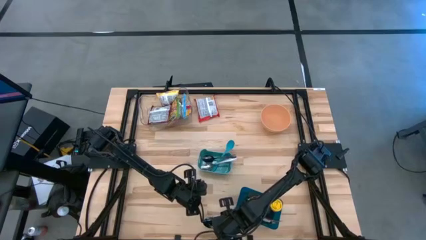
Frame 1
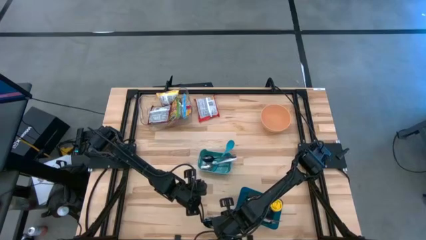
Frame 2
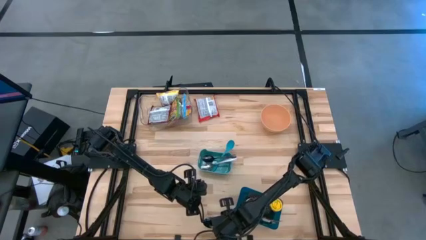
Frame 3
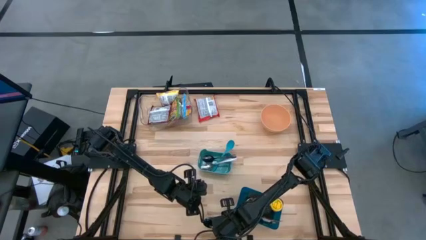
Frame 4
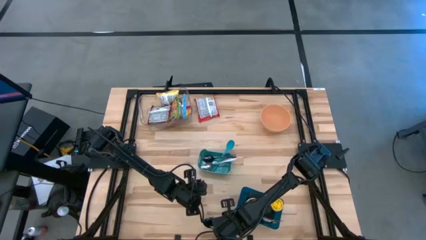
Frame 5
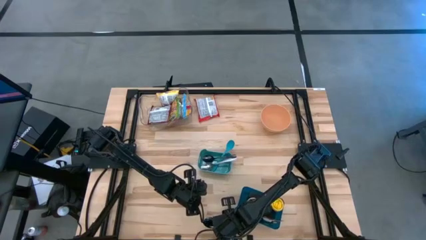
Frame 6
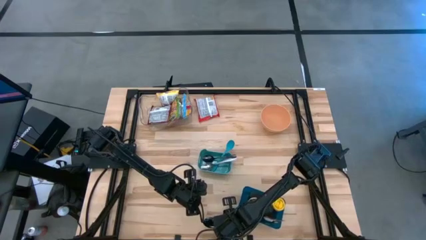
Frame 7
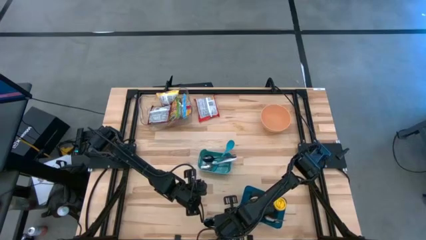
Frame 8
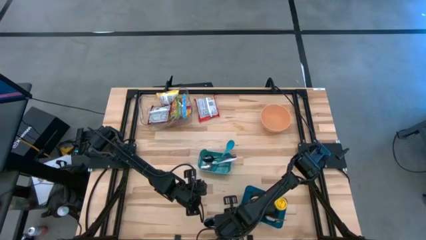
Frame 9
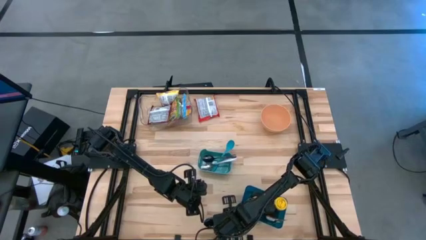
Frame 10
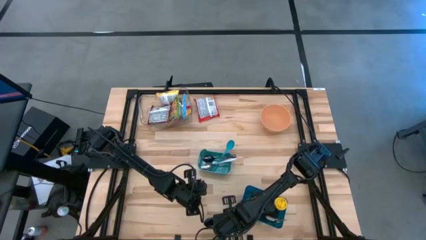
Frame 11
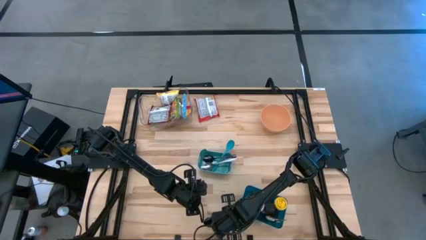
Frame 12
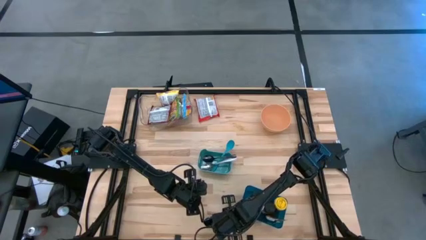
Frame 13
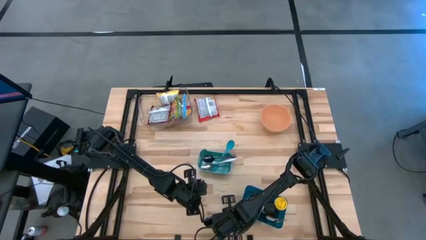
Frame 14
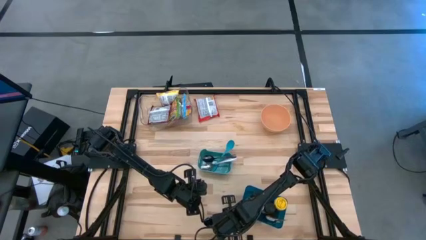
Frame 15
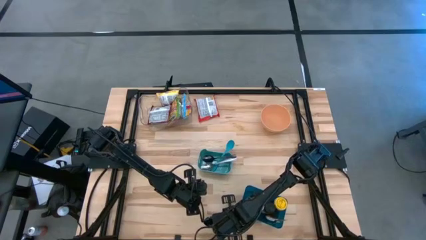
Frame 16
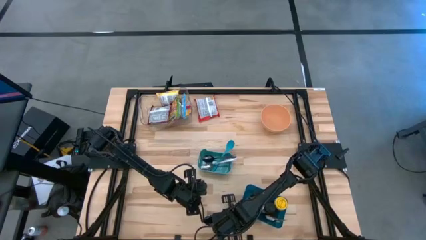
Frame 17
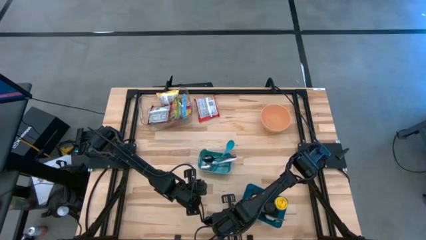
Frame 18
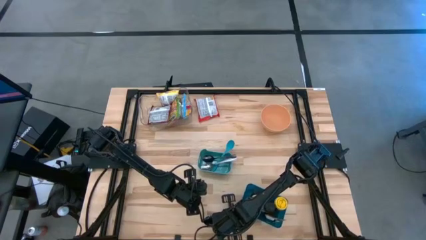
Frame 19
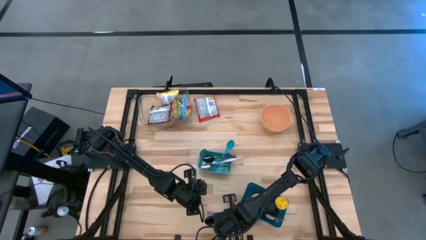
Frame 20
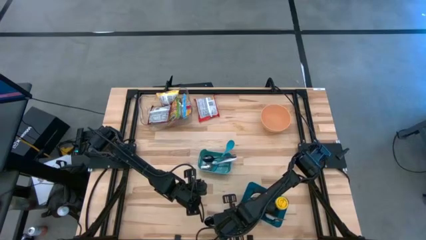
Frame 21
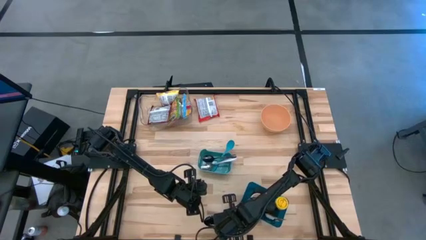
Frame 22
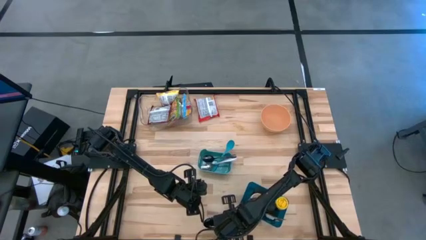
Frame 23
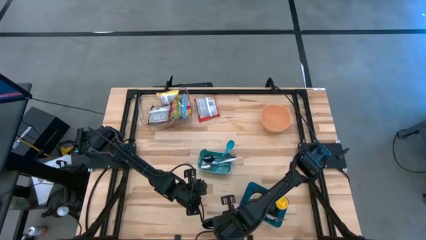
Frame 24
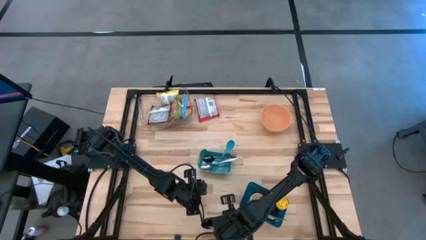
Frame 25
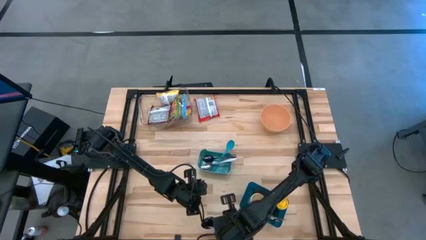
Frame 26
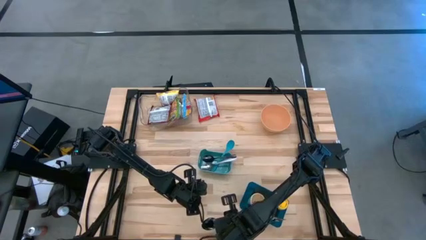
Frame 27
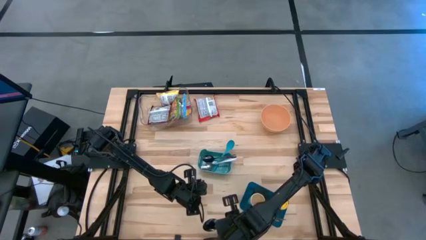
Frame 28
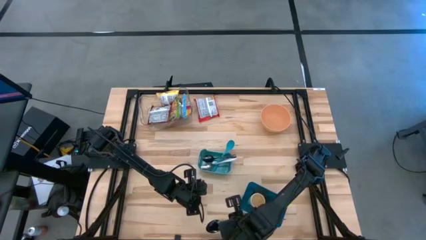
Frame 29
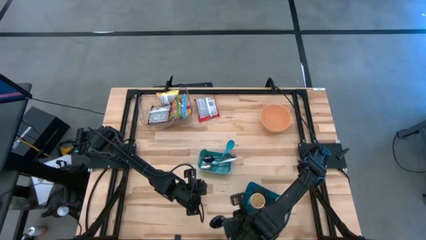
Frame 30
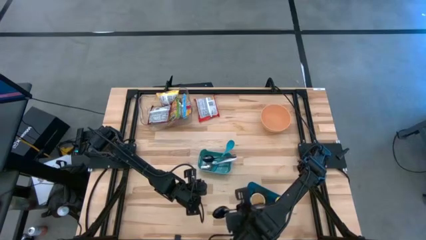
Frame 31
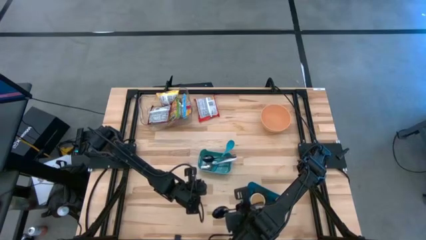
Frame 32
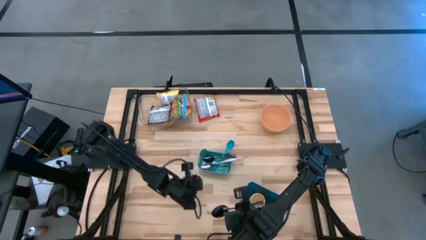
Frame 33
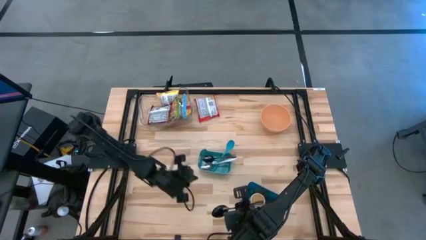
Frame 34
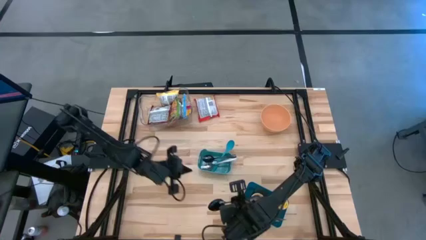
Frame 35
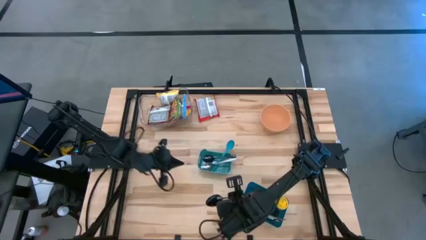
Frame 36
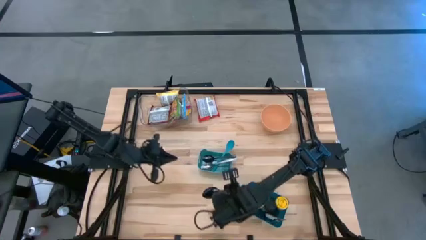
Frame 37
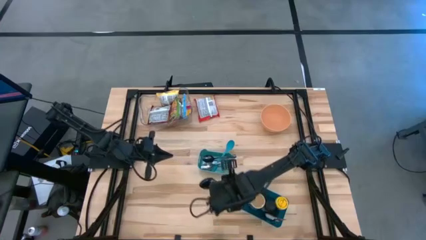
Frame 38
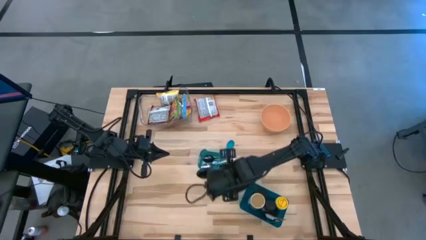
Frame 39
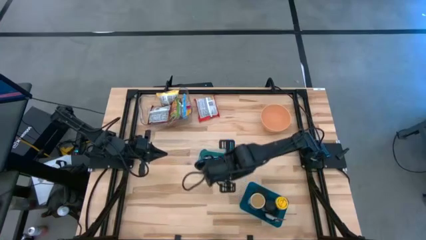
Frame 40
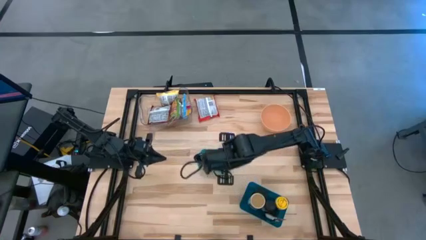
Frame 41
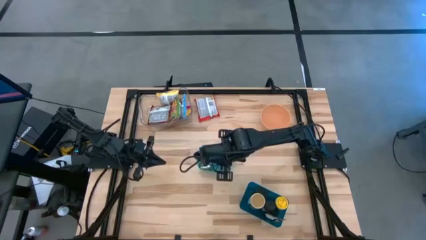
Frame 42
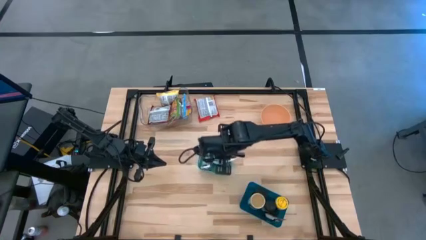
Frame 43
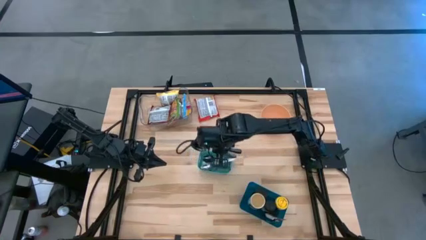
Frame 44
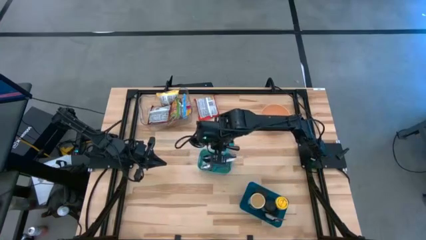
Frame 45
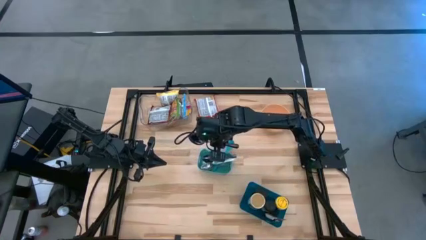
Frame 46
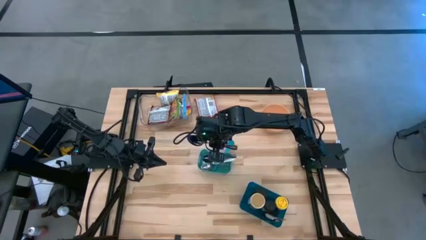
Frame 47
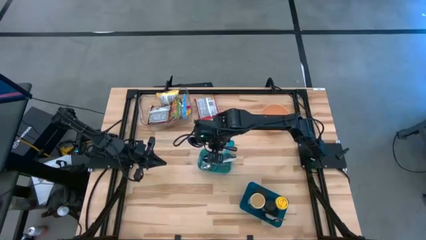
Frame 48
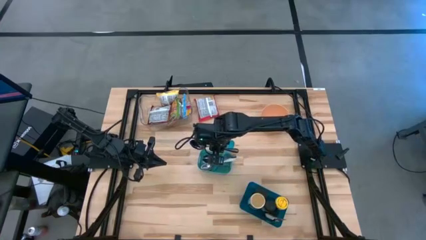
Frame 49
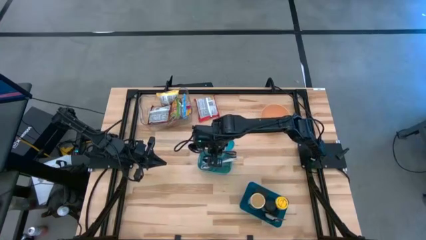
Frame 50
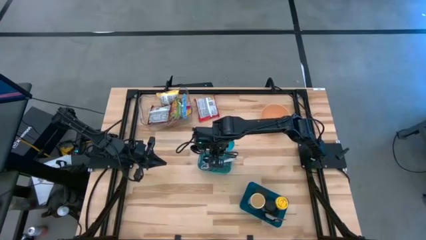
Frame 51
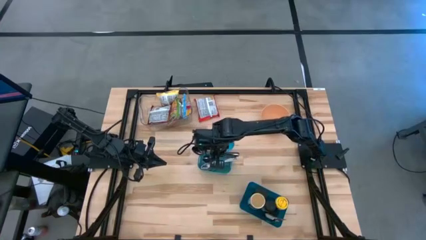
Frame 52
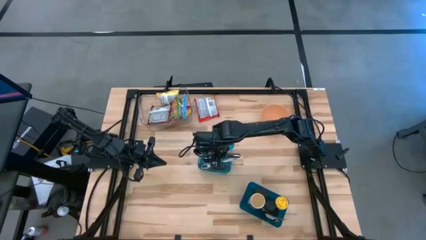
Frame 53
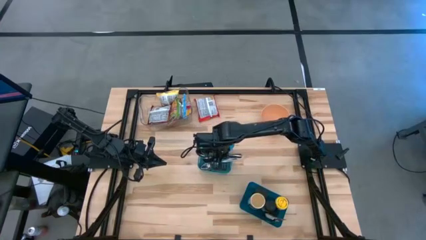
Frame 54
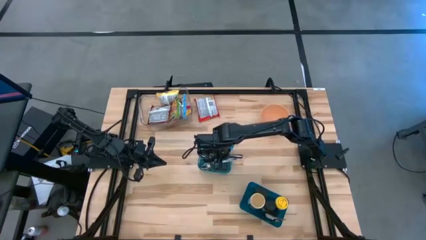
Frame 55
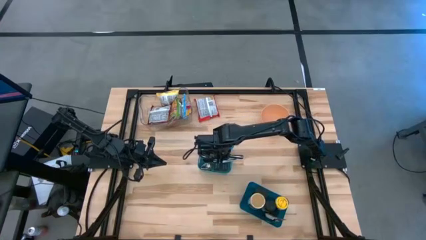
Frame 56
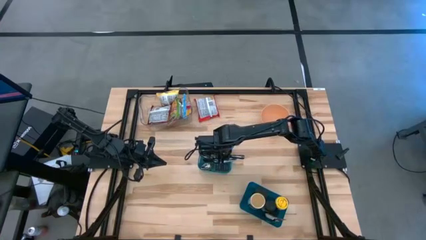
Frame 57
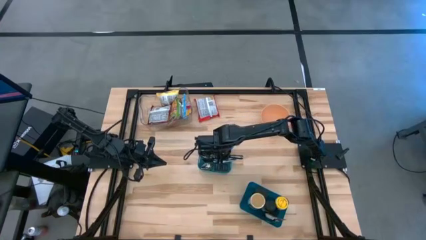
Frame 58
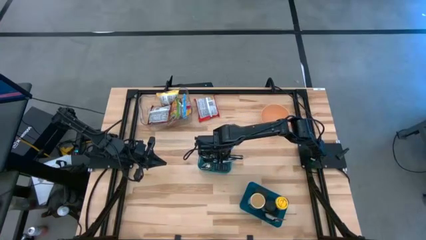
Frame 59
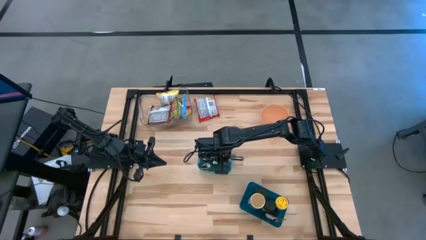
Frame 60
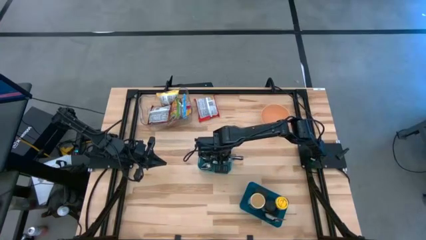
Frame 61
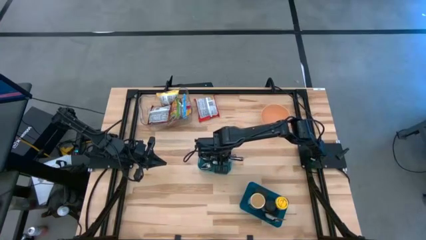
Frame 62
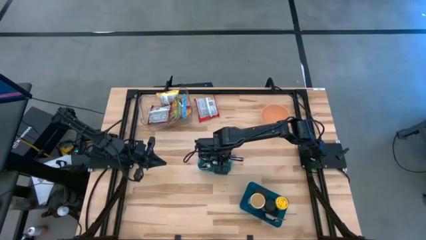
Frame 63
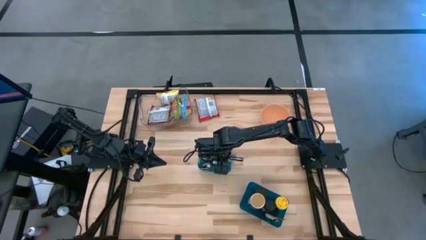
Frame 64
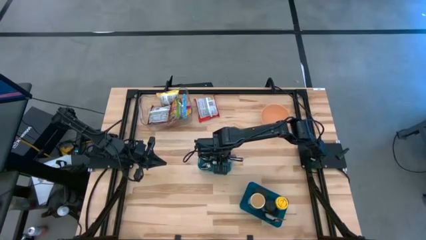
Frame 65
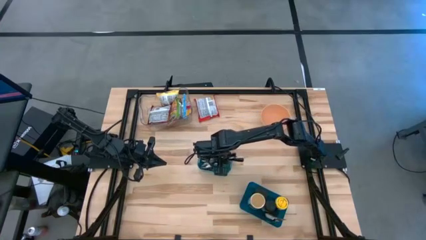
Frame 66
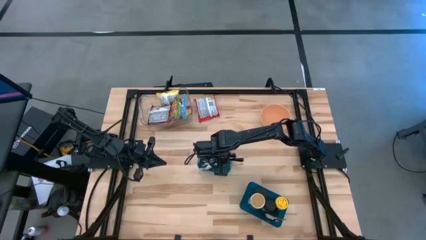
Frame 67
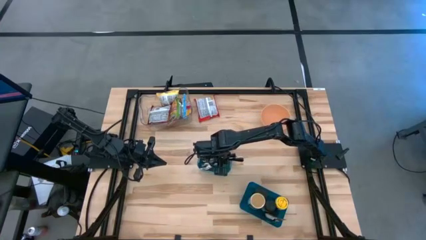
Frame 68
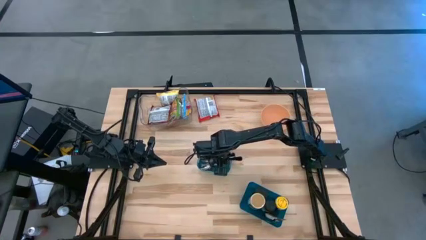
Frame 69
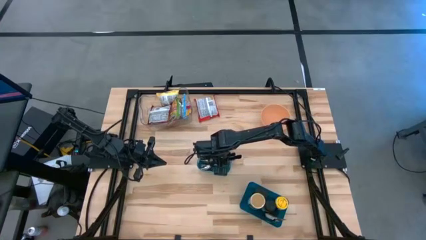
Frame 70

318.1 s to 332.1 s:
Task: Pick & Place Food Item
Put the black tablespoon into the green bin
